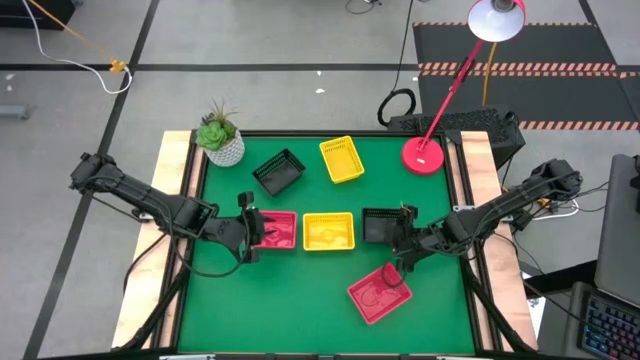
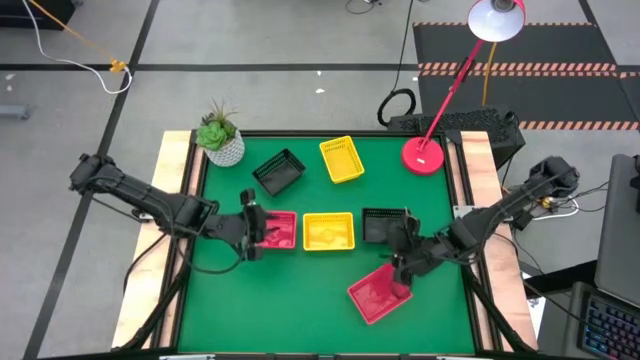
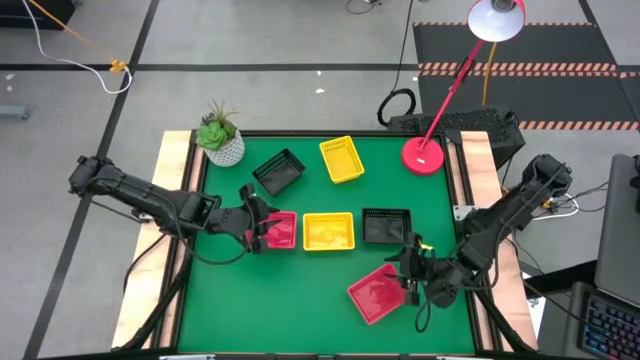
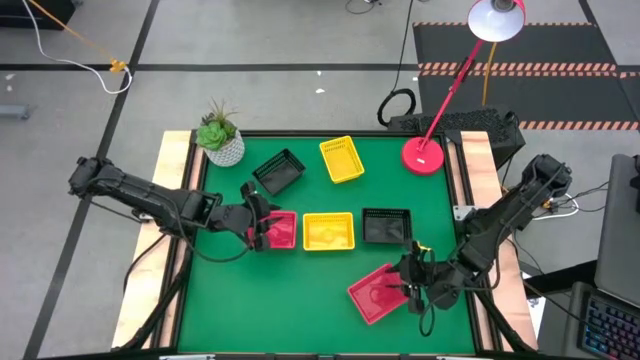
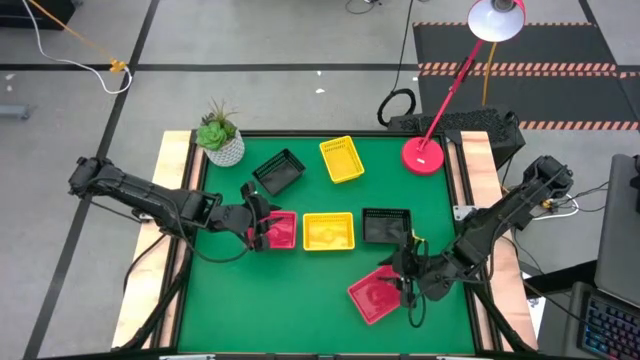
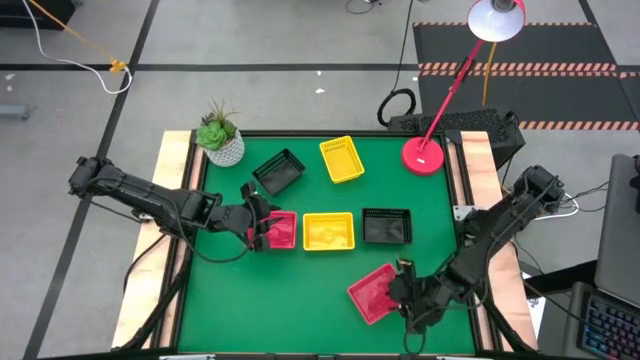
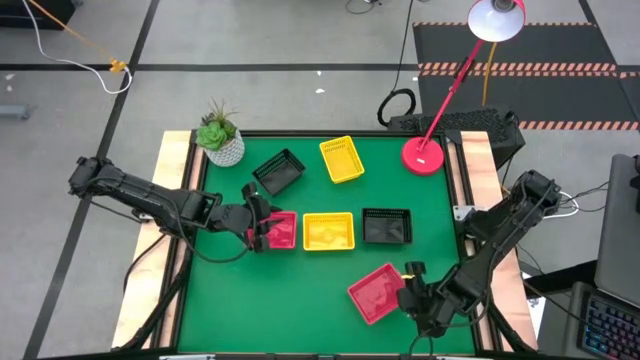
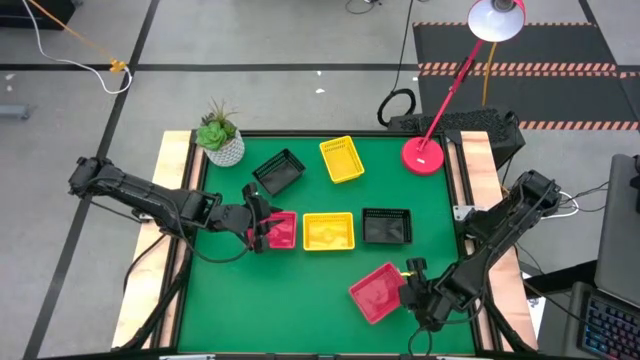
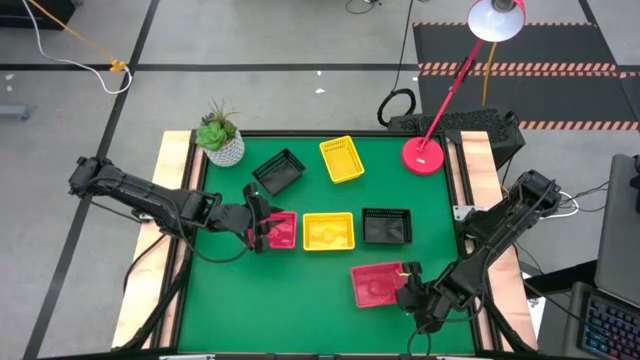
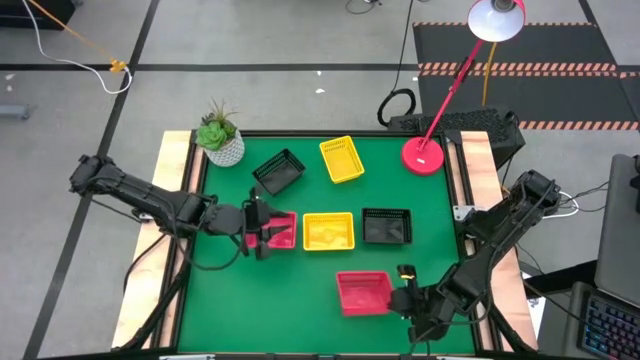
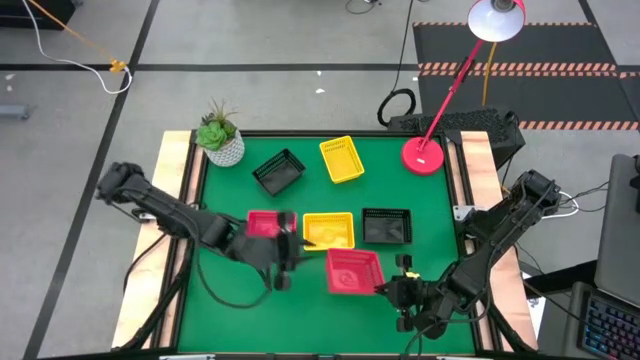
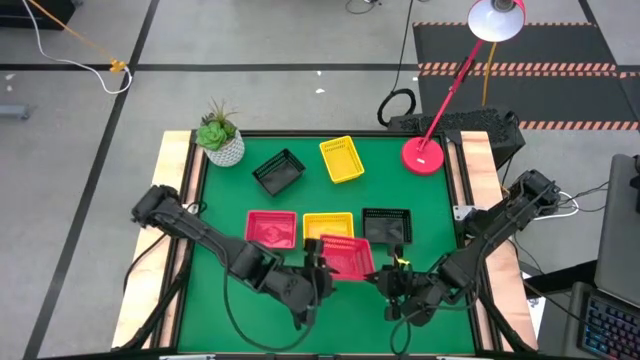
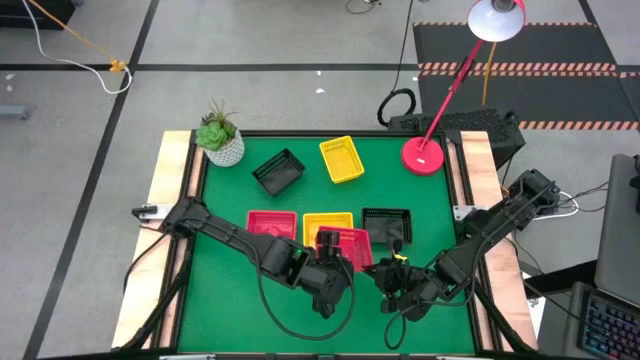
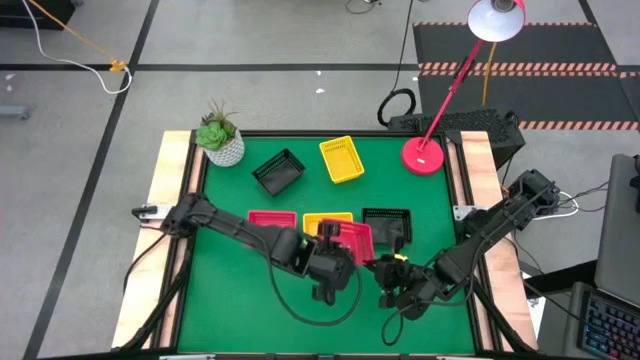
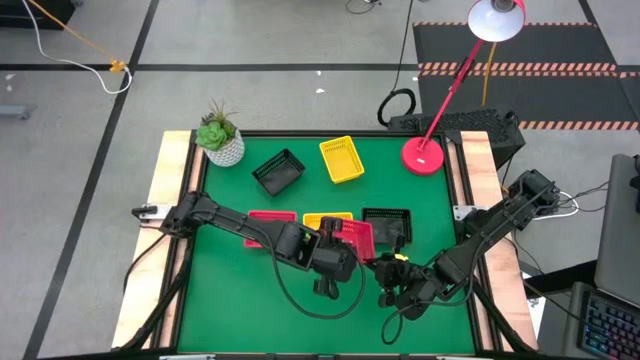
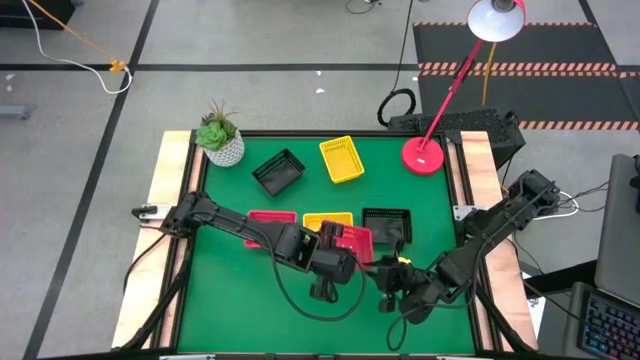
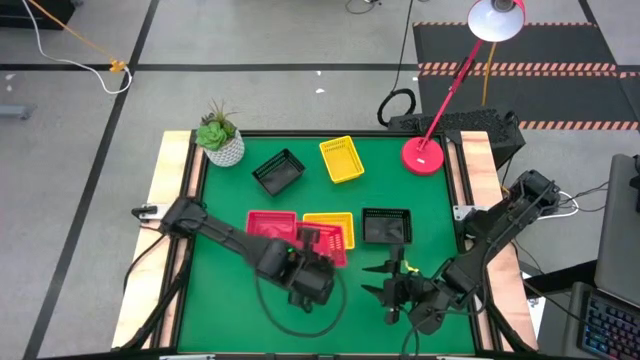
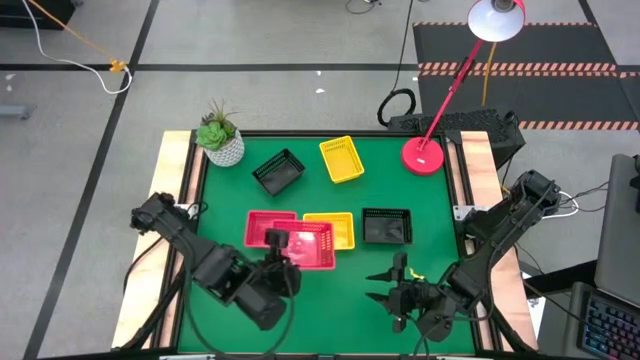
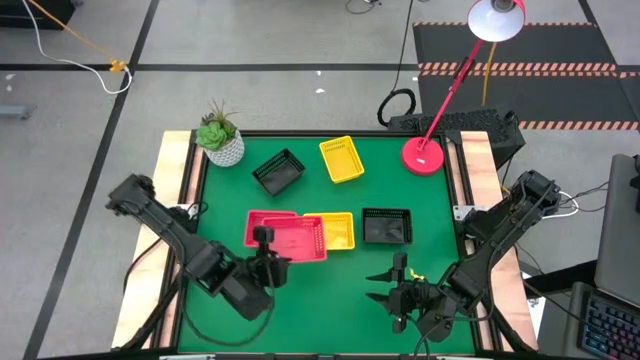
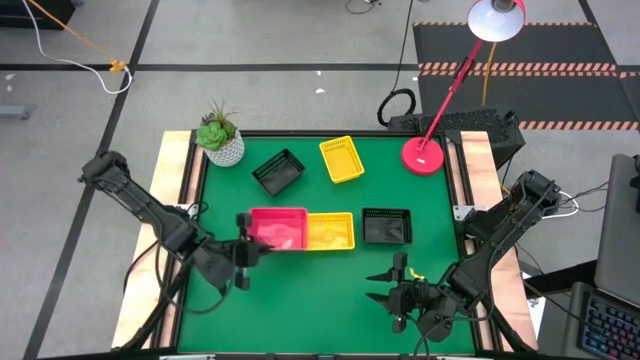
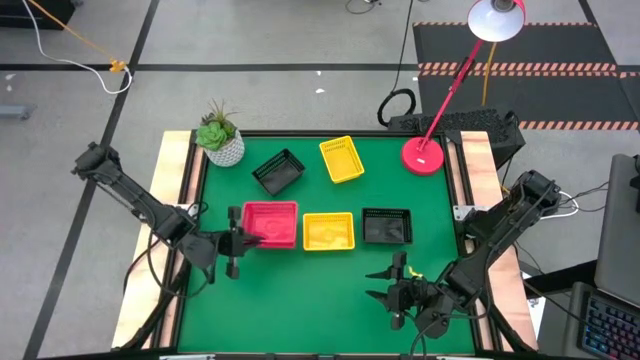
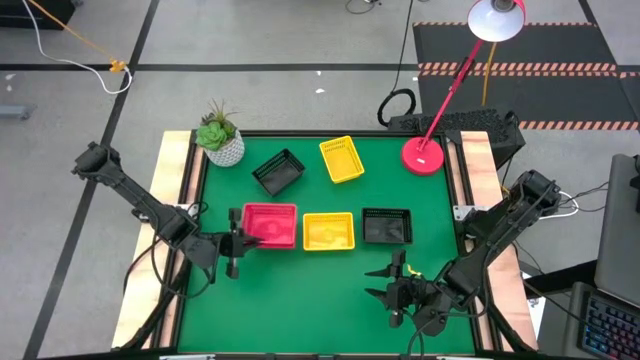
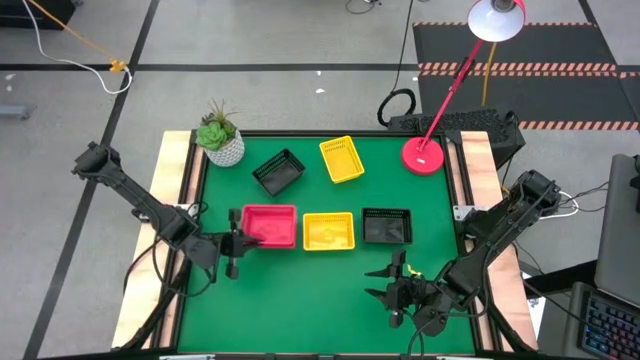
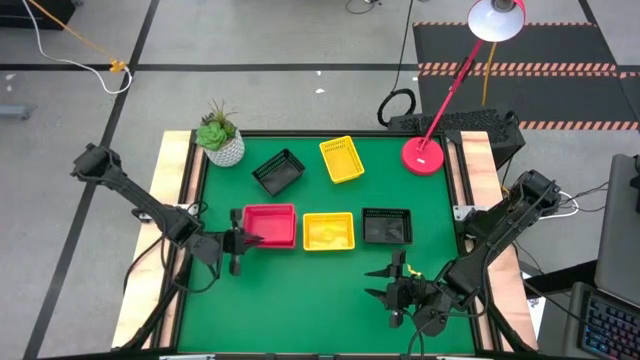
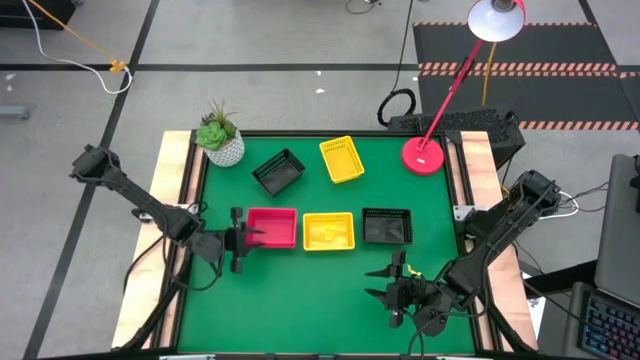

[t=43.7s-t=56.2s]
Stack the red bin on top of the red bin

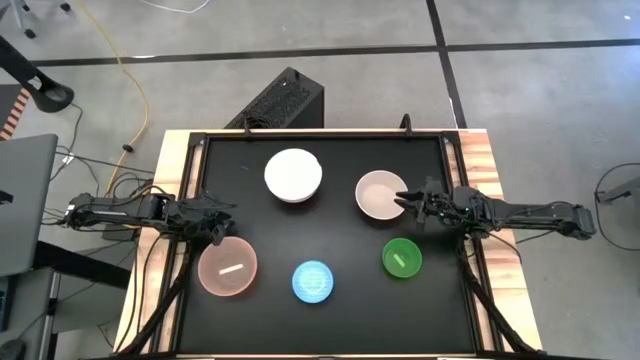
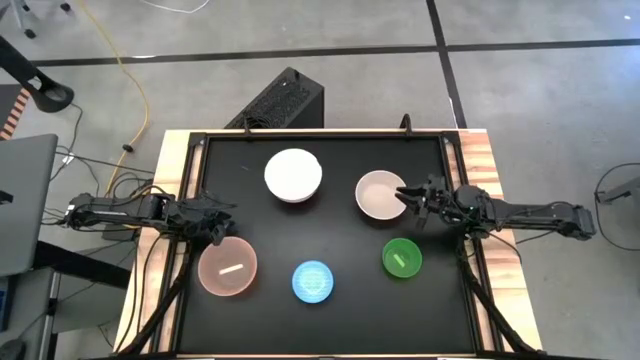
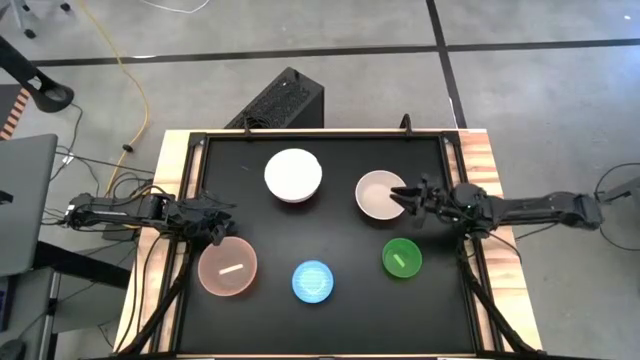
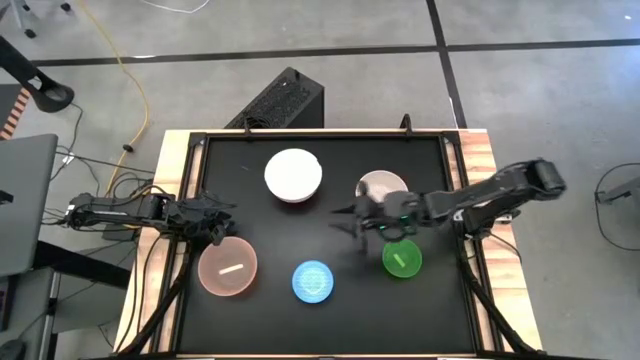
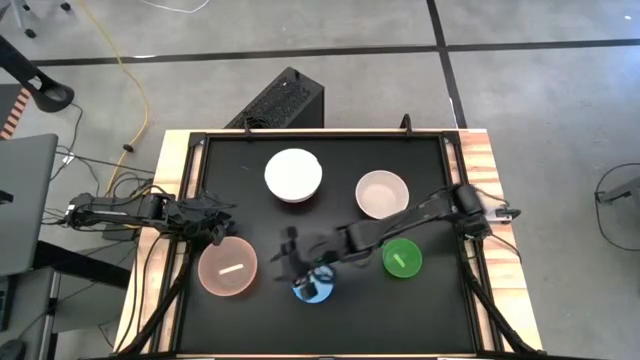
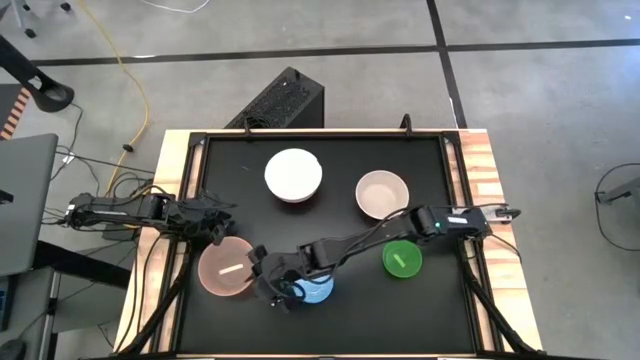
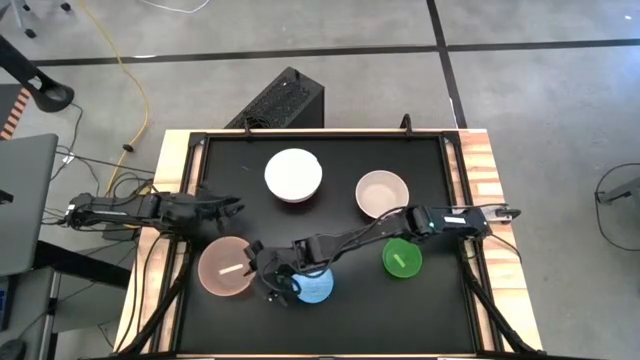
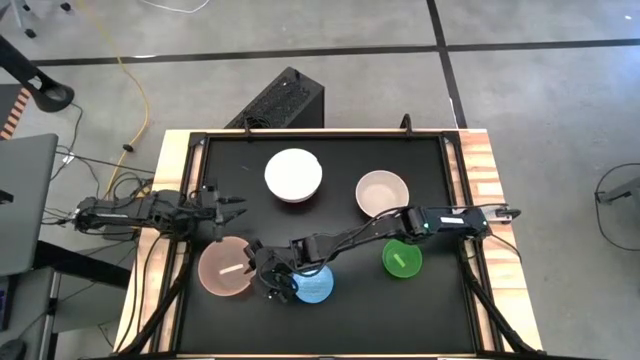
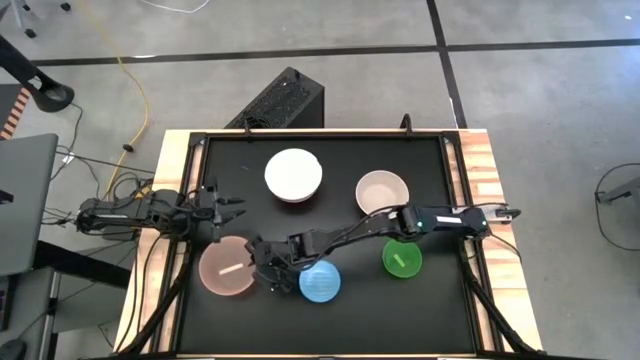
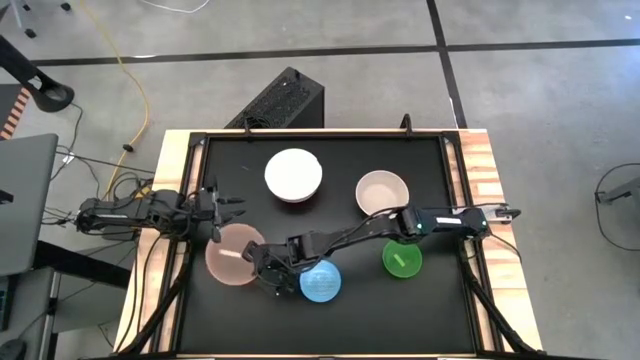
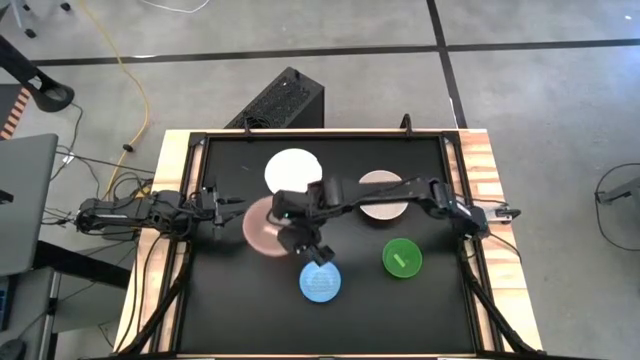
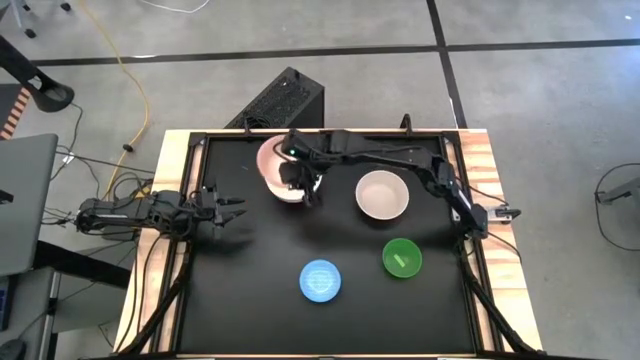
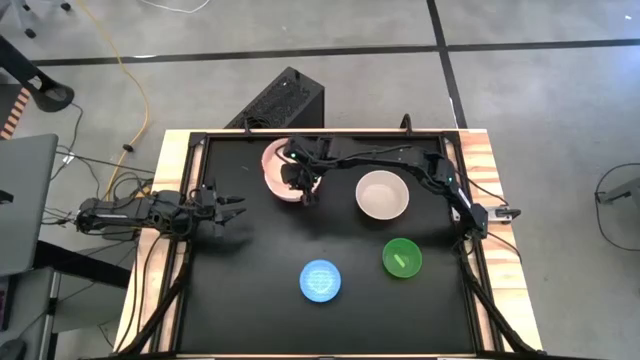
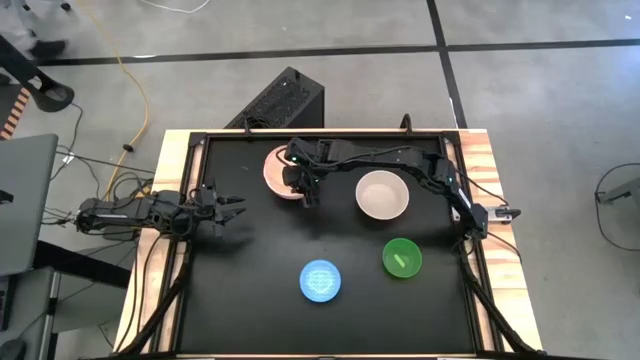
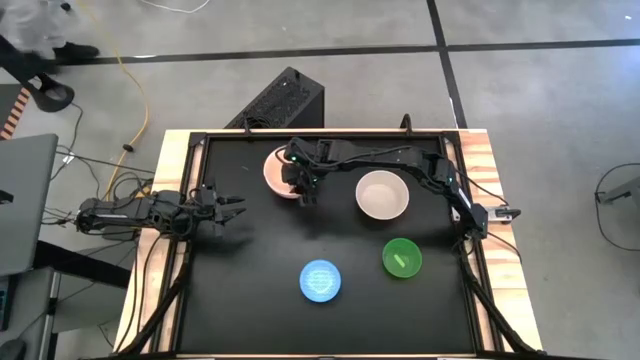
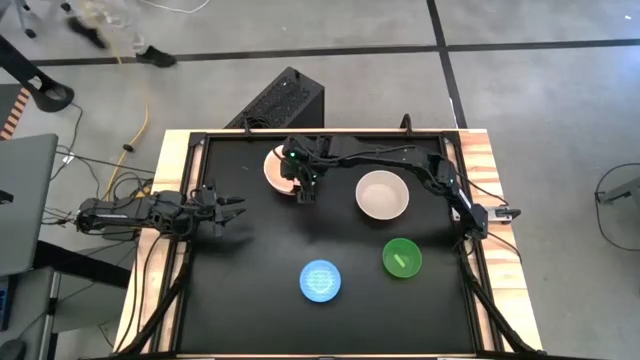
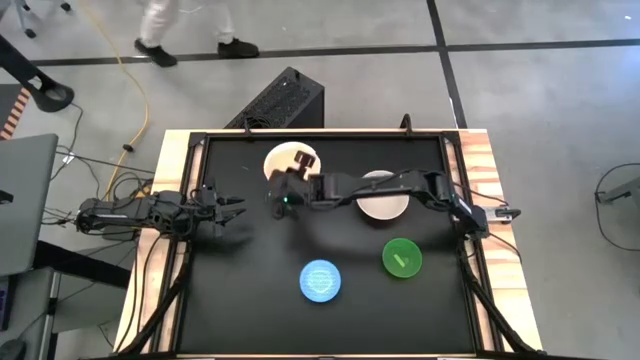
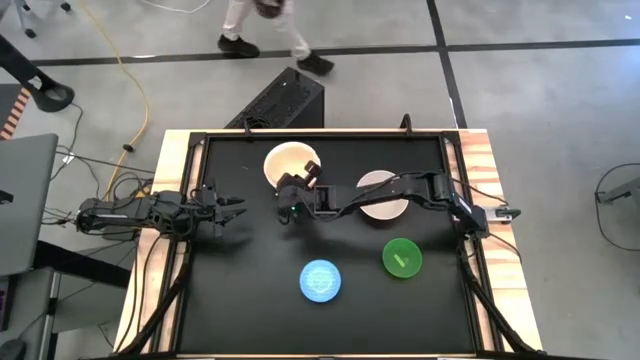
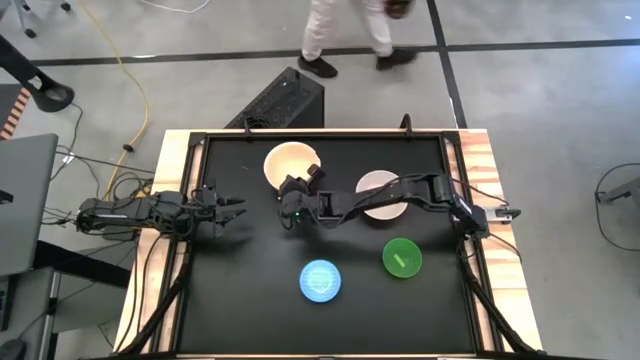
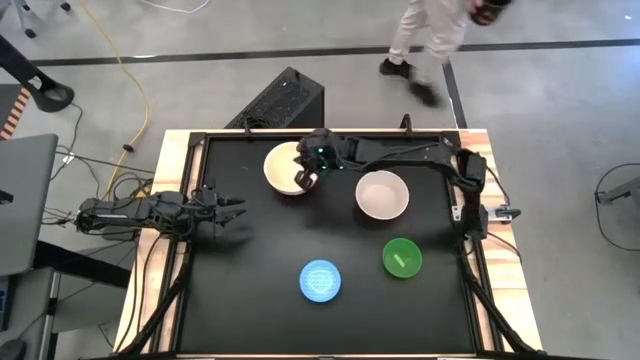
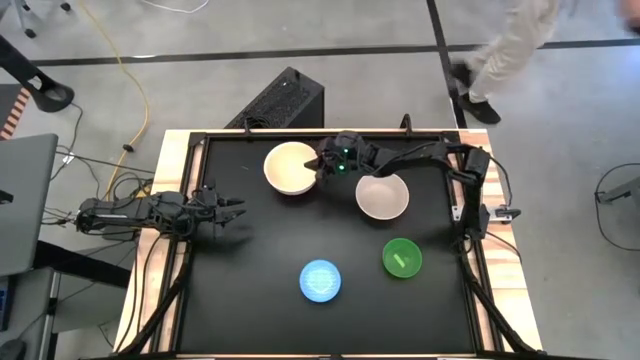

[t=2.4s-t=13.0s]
Stack the pink bowl on top of the white bowl
